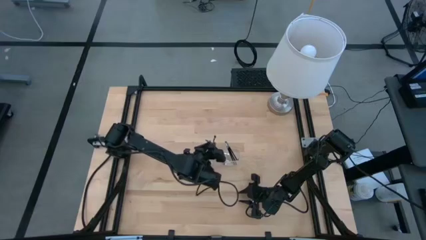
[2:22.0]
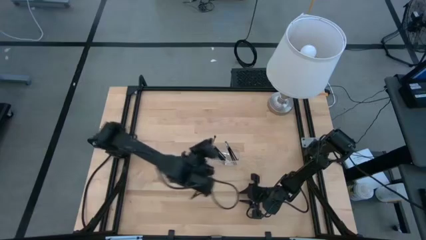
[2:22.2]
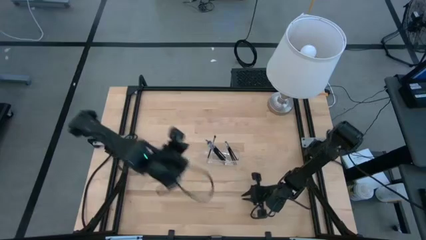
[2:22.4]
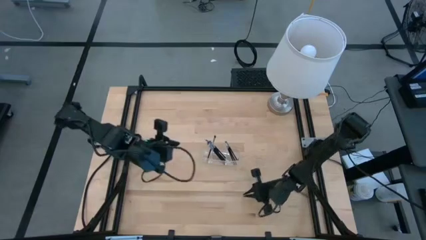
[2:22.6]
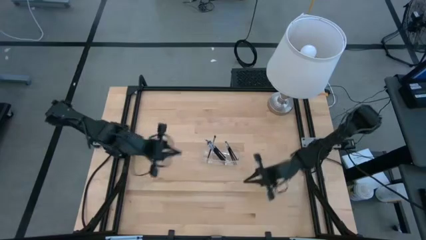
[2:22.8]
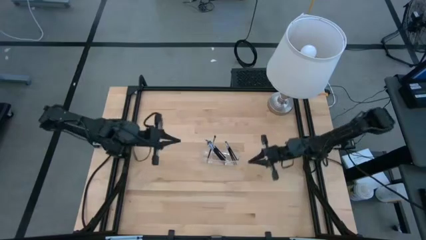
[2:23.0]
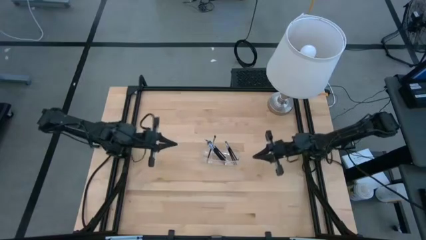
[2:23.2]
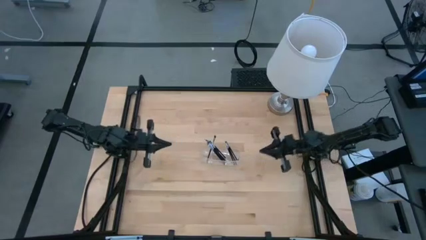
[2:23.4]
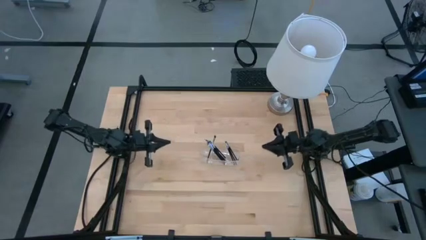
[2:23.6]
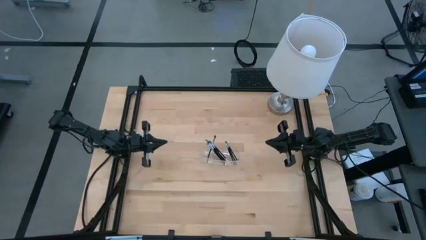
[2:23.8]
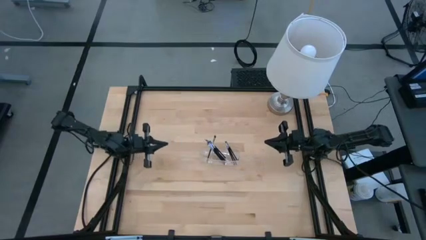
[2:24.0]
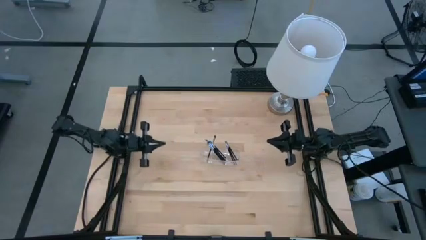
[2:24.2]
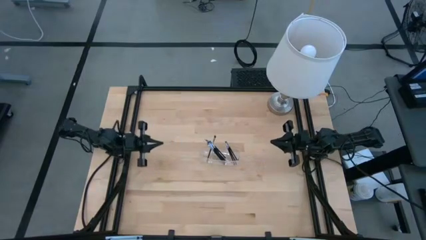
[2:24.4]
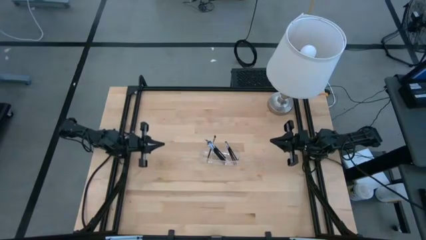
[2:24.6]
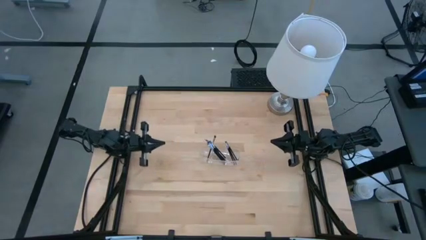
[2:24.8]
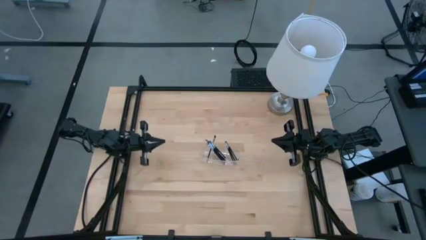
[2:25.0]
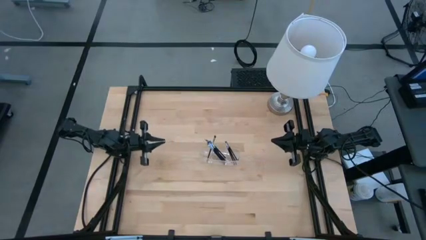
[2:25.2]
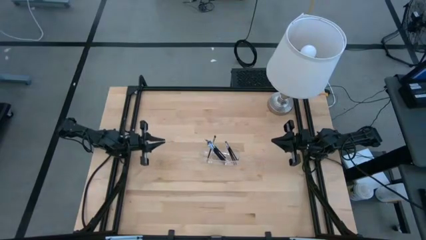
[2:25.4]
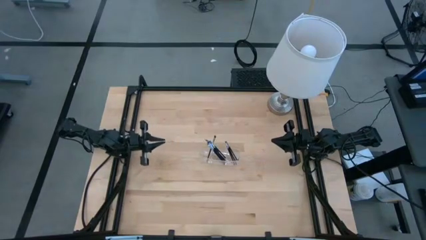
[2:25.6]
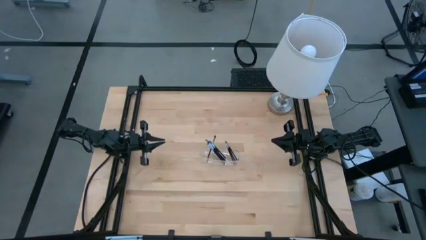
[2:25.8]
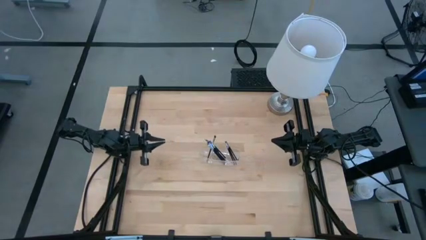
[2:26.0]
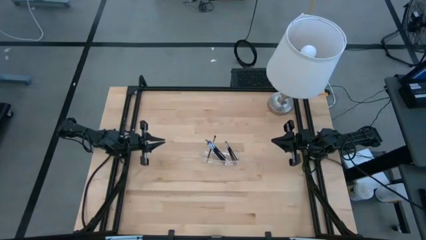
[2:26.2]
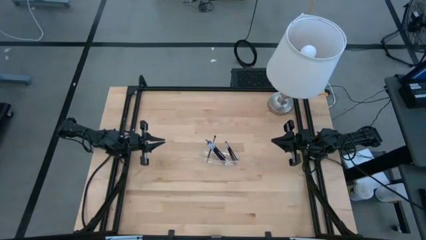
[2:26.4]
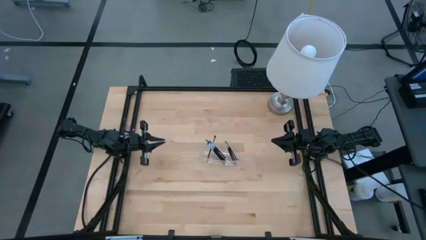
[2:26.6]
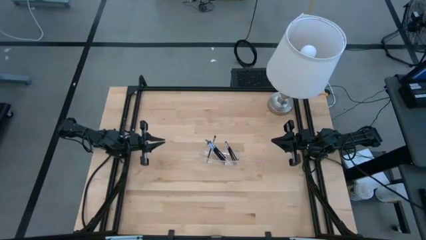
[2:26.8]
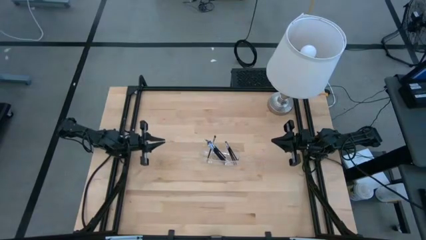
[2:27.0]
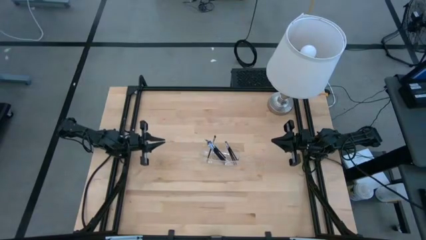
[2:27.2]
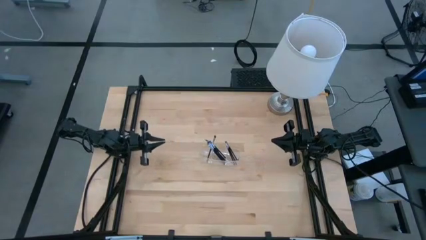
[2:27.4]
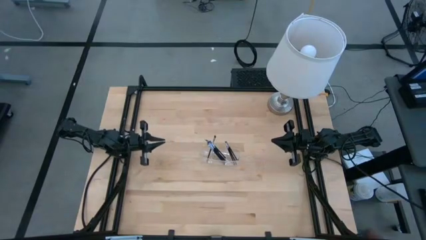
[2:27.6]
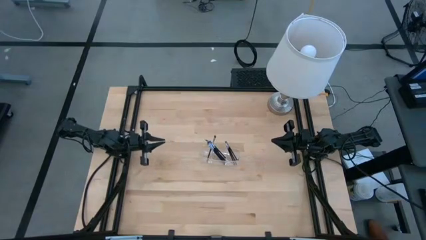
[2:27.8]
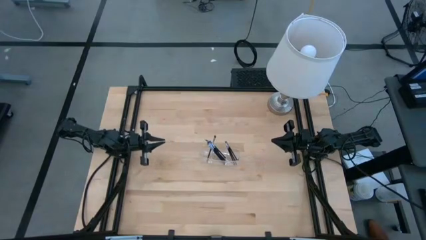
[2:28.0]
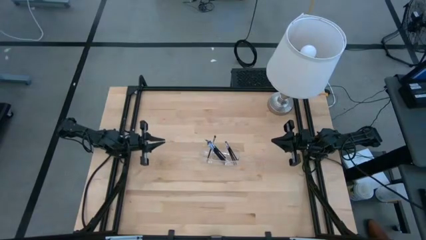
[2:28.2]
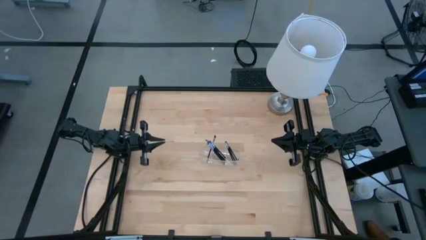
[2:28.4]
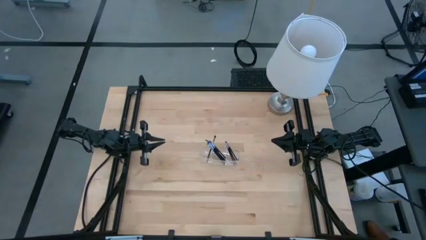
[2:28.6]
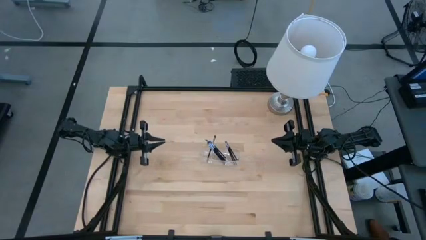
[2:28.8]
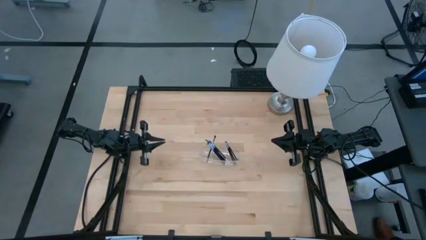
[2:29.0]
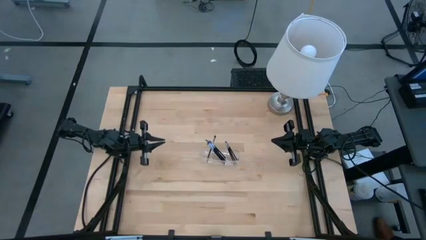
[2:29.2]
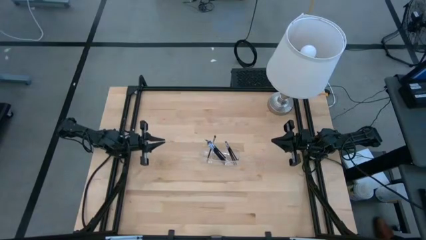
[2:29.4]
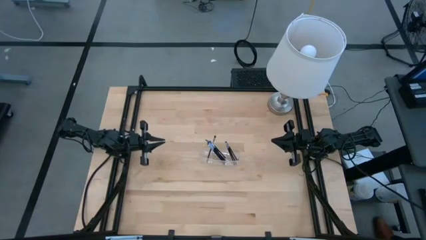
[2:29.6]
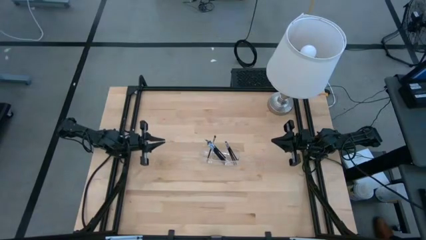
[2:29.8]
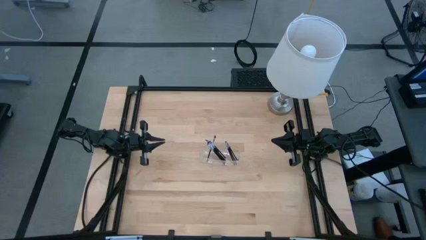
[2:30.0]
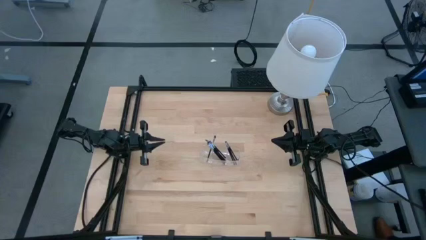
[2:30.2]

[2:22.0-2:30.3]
Task: Put items in baskets/containers
Return to Home Position

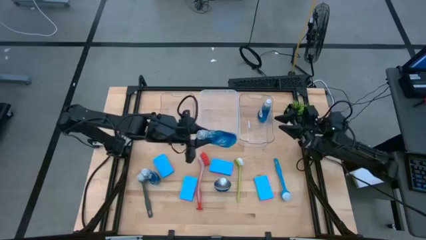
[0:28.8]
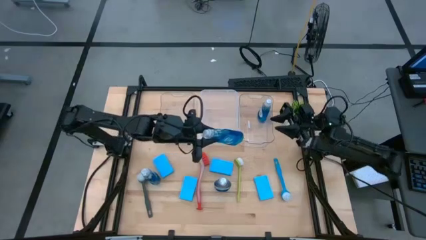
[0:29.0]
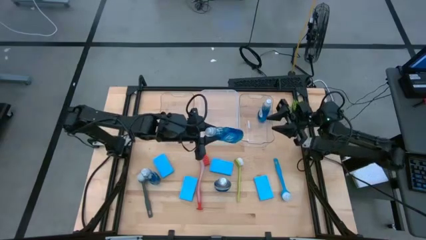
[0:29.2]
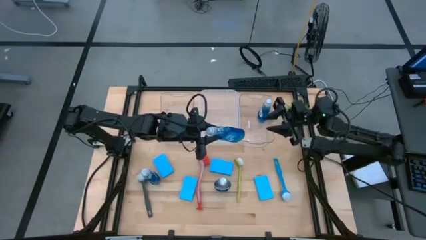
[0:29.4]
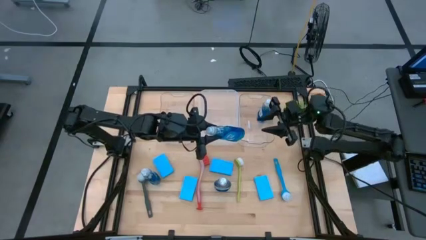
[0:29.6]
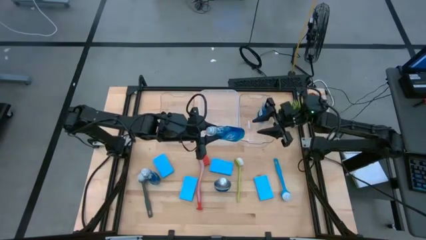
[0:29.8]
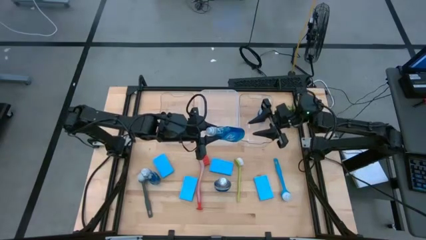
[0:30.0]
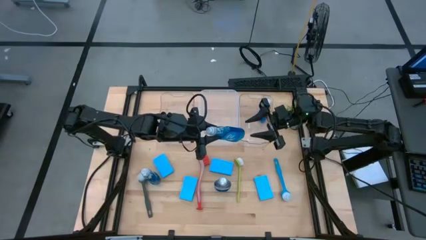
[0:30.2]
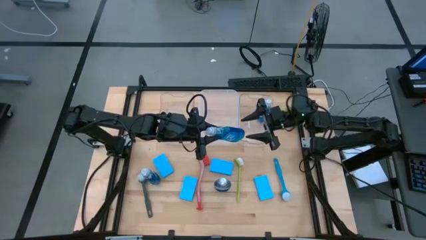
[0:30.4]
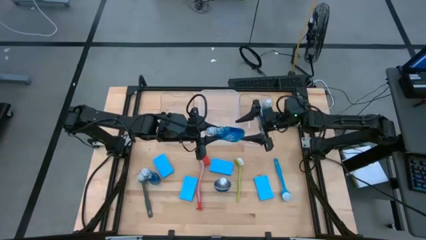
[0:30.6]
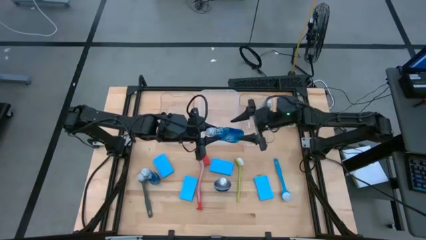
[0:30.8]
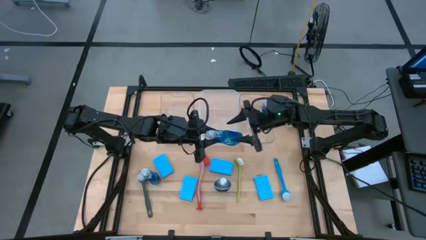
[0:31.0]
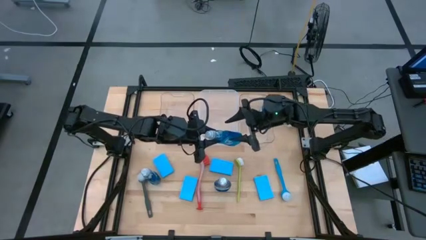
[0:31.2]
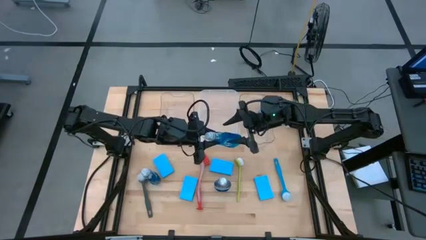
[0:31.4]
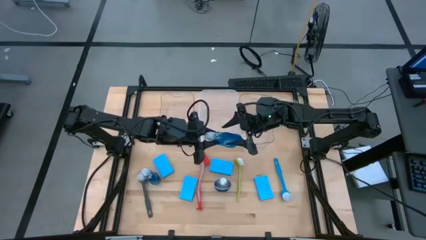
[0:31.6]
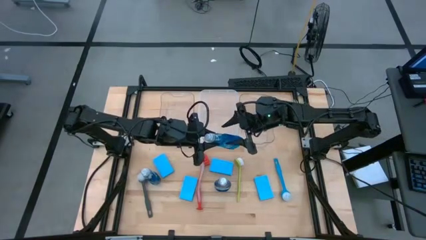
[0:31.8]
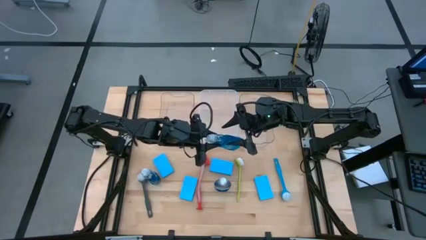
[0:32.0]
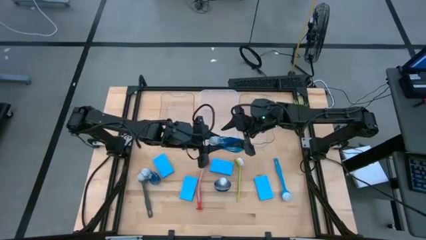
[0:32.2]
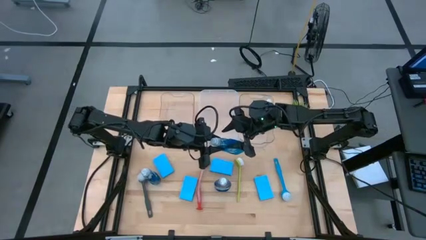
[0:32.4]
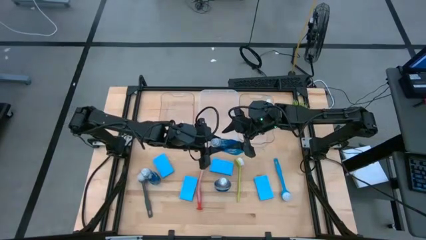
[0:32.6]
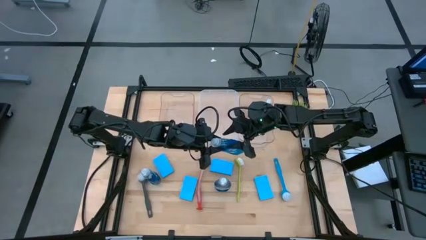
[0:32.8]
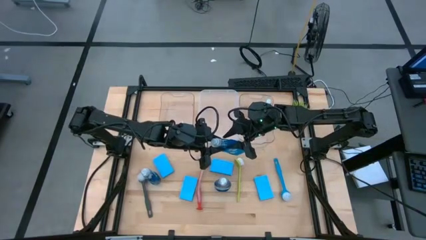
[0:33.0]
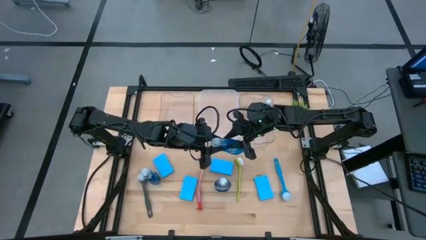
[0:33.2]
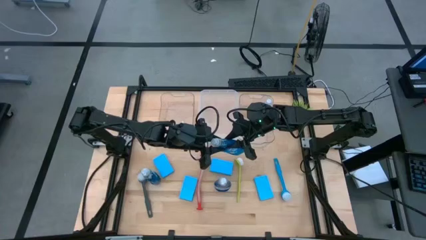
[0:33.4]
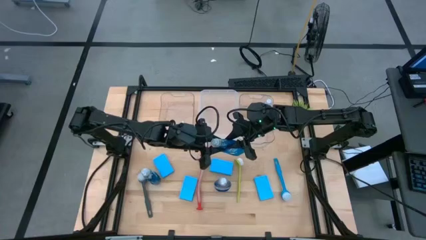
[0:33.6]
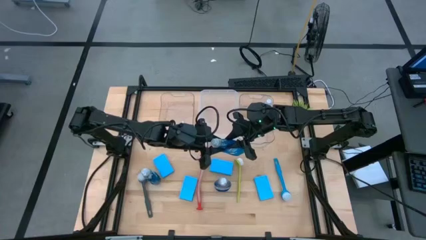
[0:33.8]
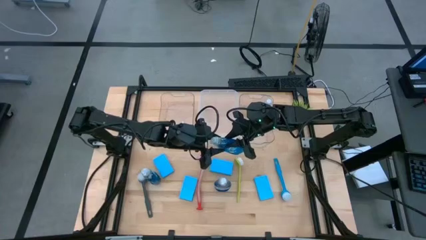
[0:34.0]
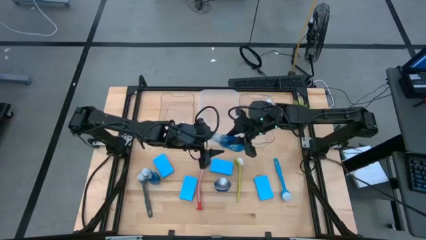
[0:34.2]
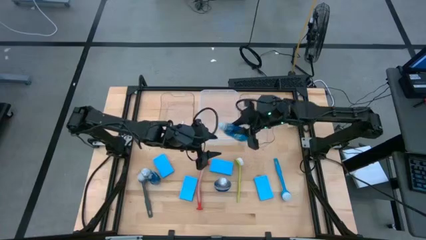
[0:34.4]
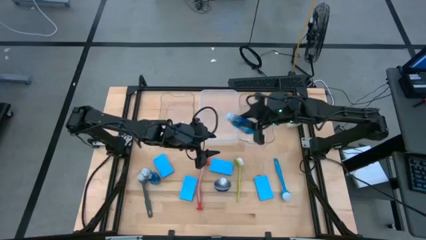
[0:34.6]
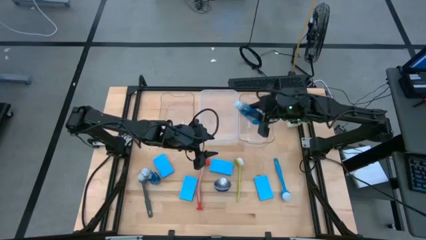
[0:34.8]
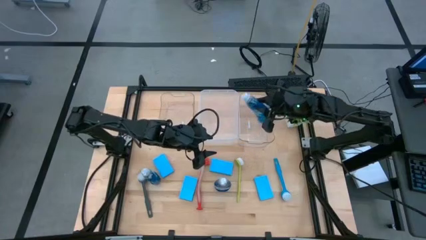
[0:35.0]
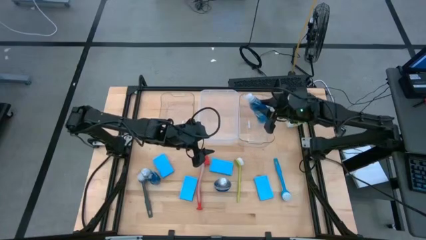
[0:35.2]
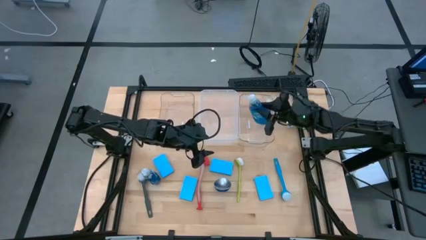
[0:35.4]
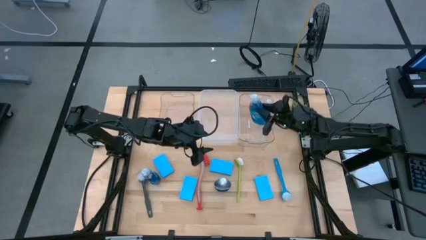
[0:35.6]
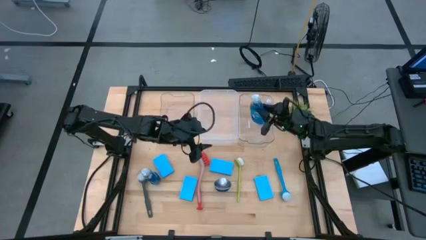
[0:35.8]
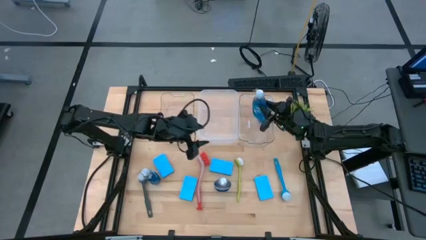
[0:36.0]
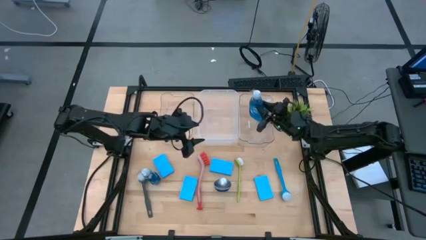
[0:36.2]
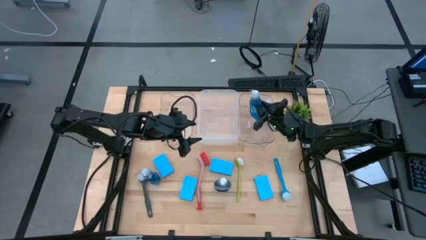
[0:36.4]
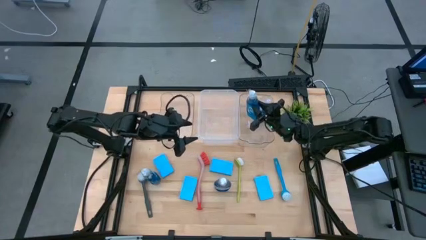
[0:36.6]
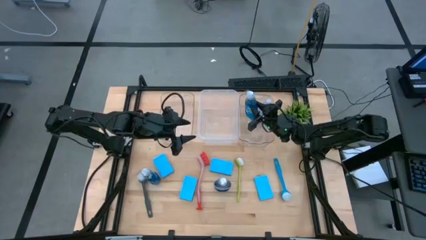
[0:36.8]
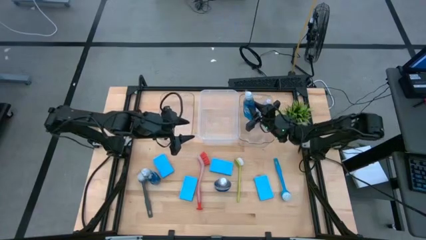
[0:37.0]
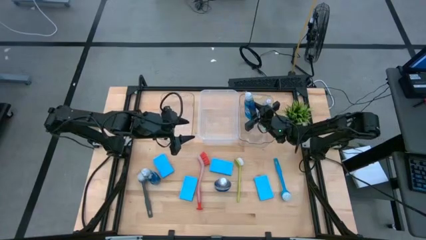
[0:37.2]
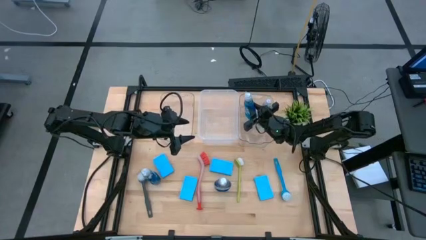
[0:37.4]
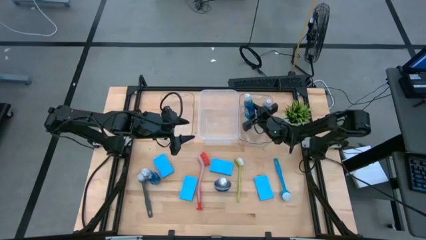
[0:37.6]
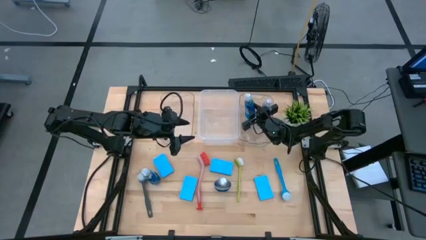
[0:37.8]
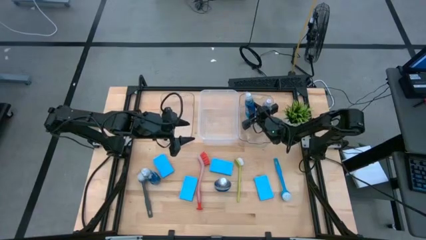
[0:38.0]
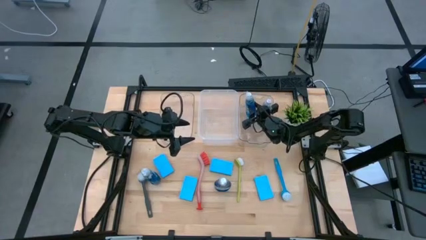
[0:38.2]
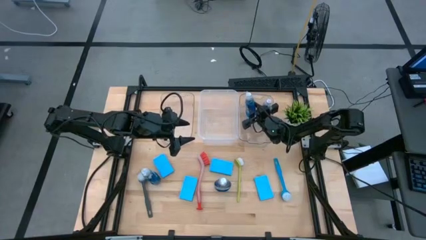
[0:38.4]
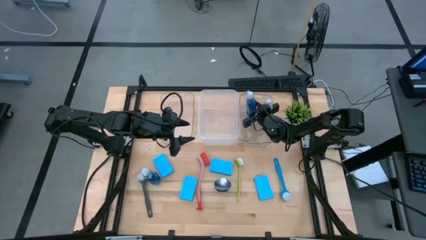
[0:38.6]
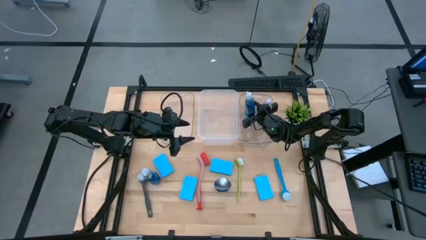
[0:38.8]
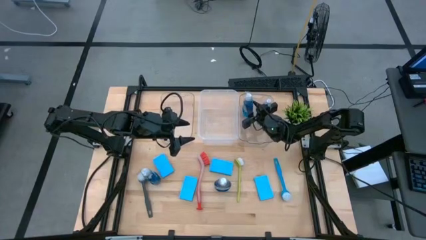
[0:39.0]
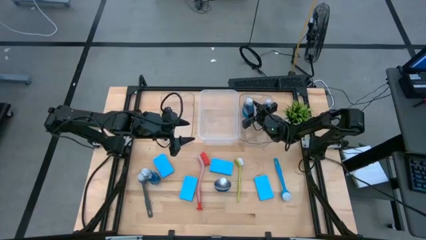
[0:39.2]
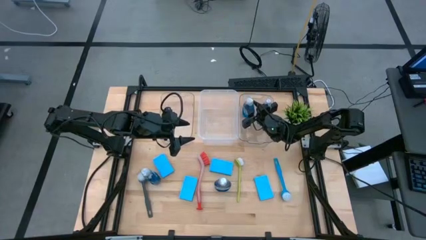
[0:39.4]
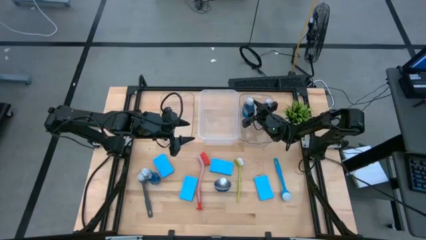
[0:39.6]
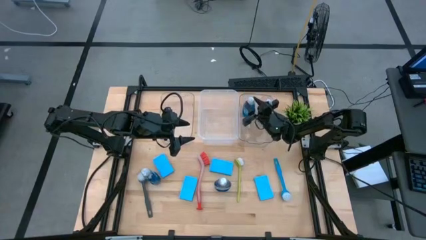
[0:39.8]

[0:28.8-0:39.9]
Task: Pick & Place Kitchen Sink Supplies
Put the dishwashing liquid into the right transparent bin
